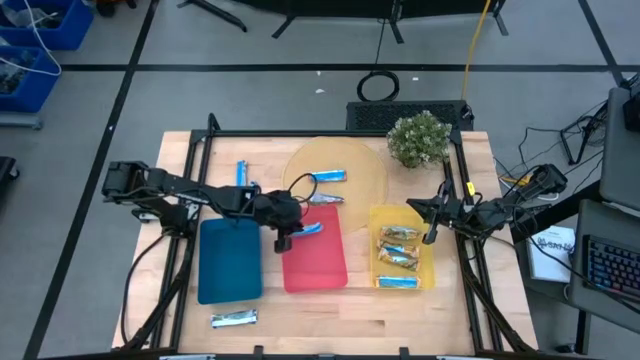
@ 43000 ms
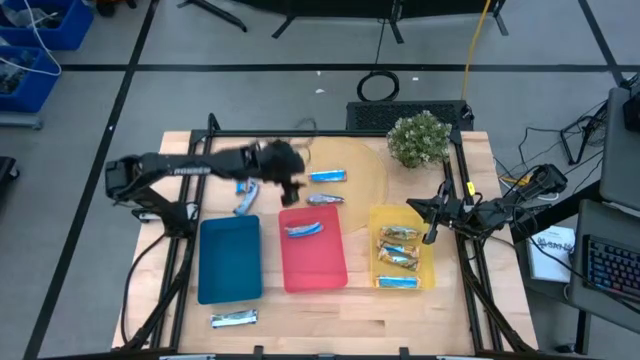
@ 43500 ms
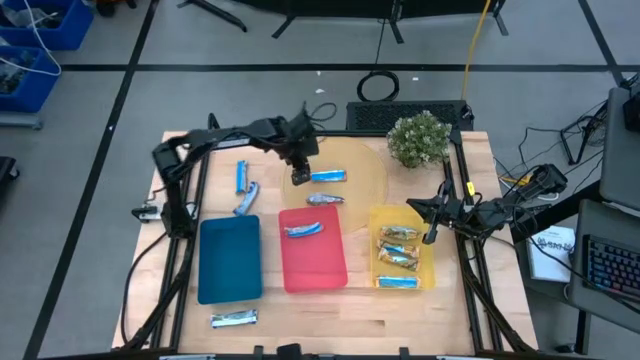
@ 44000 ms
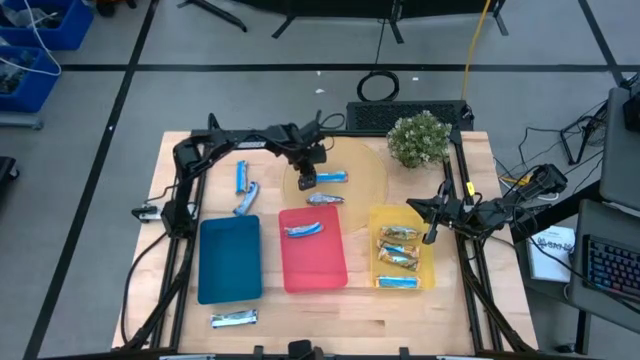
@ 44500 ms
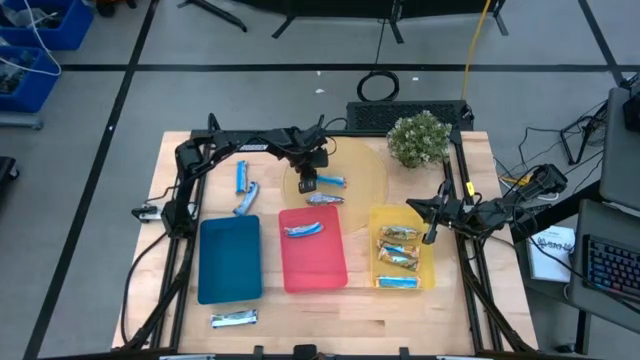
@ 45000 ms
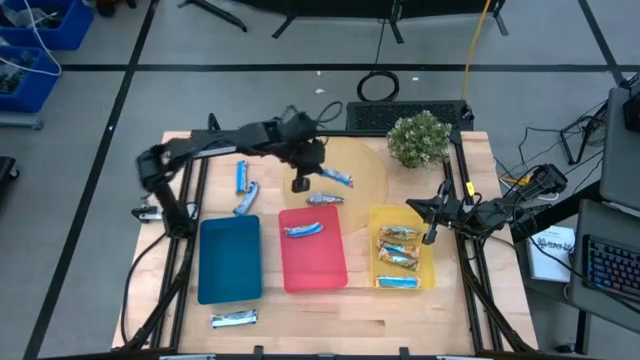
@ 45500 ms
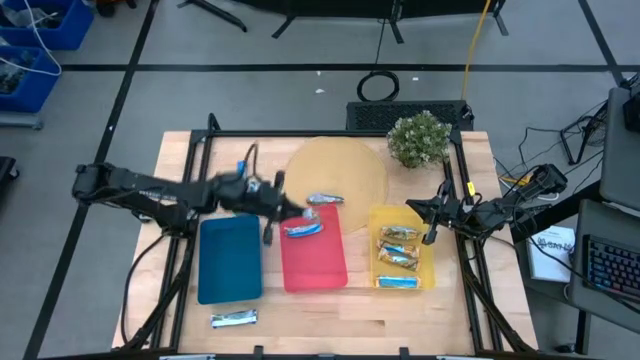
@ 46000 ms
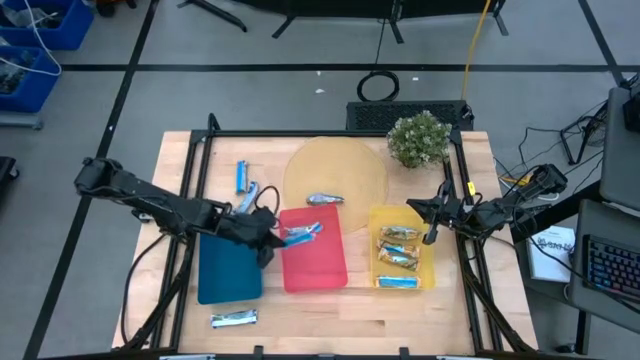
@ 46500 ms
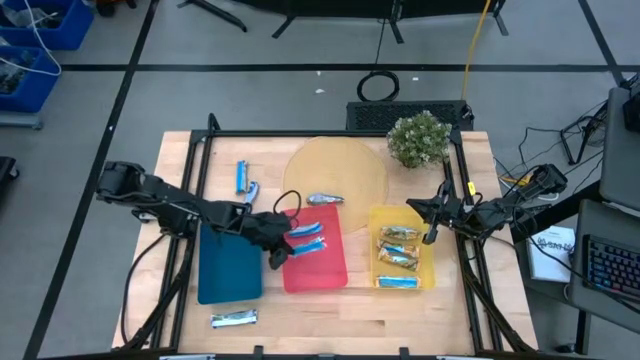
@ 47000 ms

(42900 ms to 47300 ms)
Task: Pick and place Granola Bars by type
Put the top red granola bar into the red bin

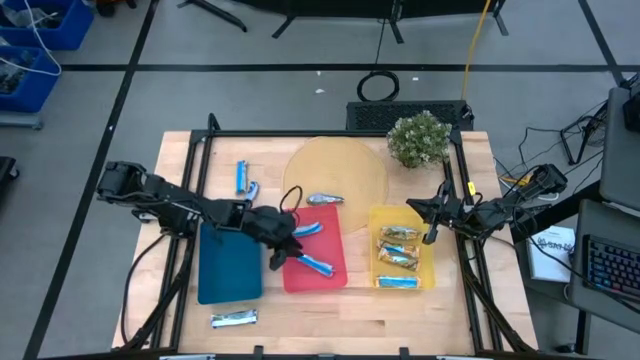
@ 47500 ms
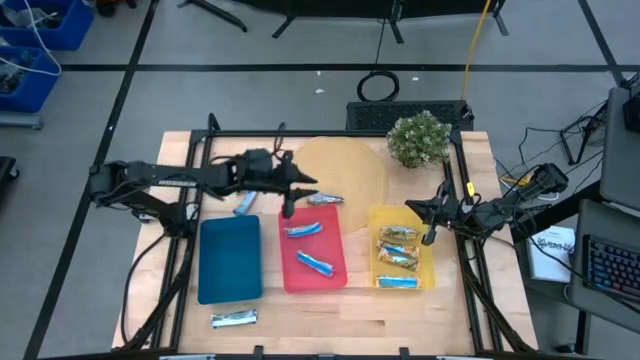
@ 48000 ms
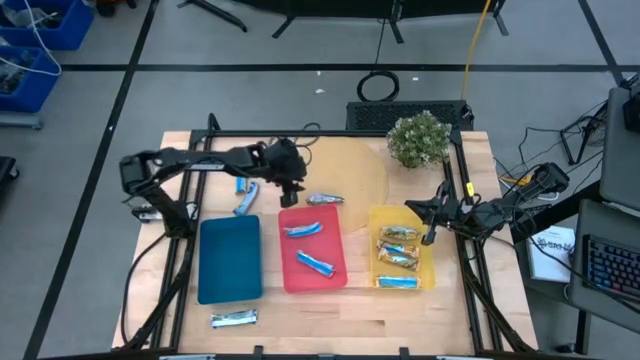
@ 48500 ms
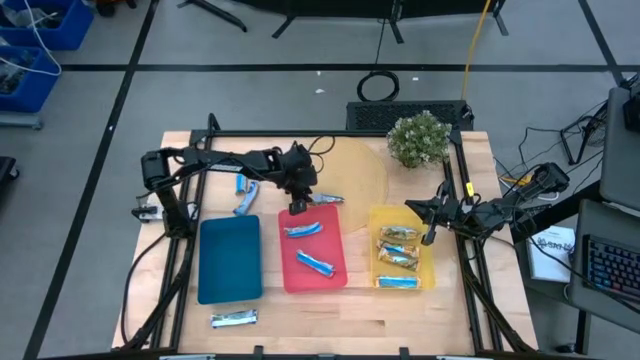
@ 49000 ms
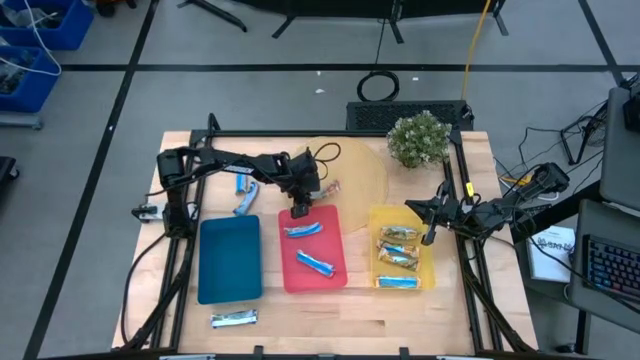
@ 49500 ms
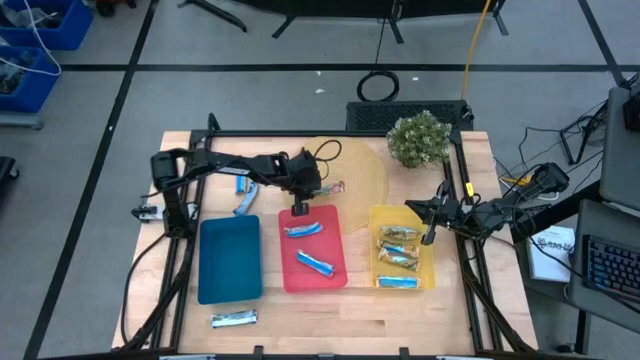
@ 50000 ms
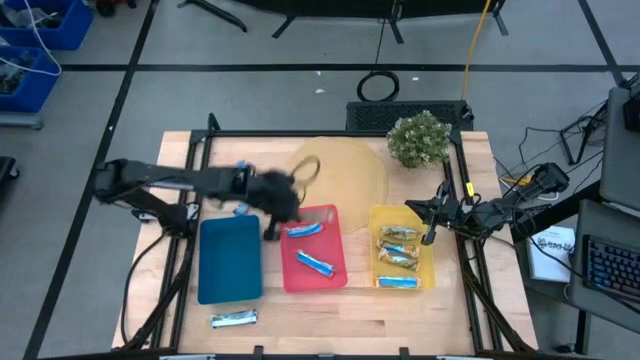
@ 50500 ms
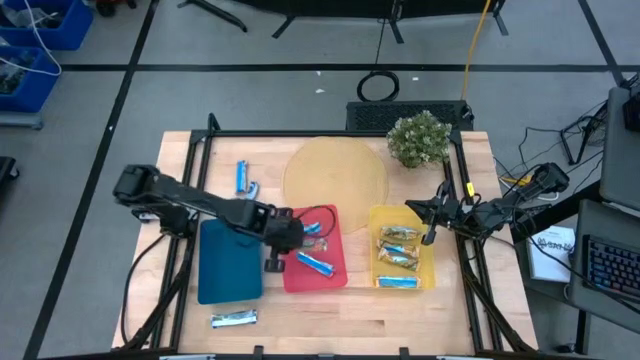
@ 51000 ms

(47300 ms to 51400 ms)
Put the red granola bar into the red bin

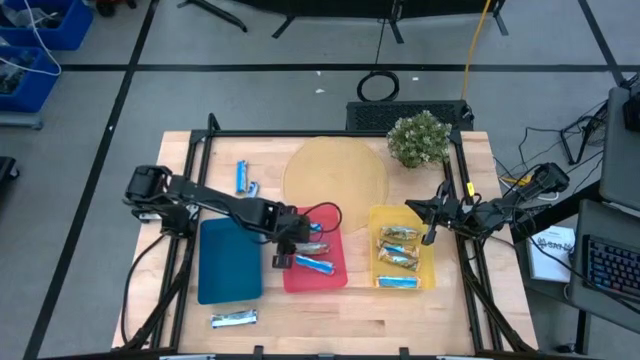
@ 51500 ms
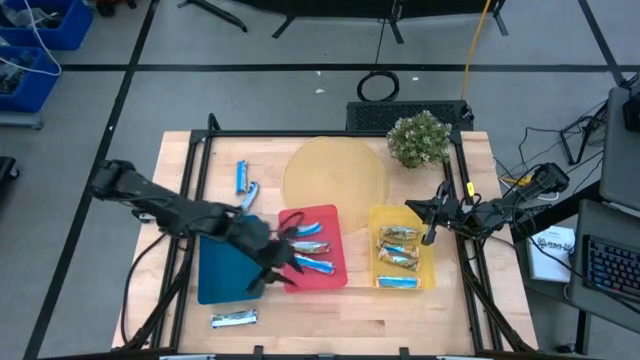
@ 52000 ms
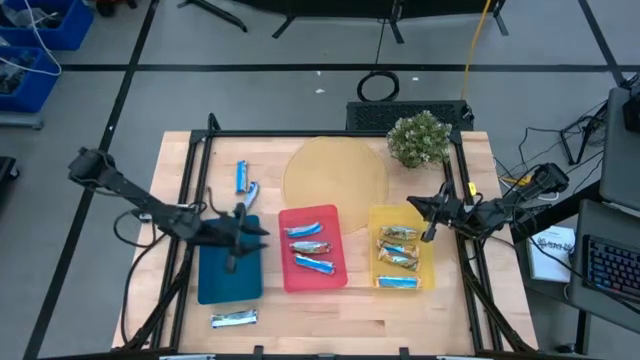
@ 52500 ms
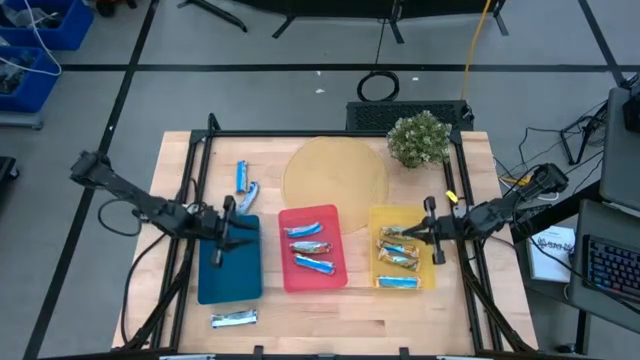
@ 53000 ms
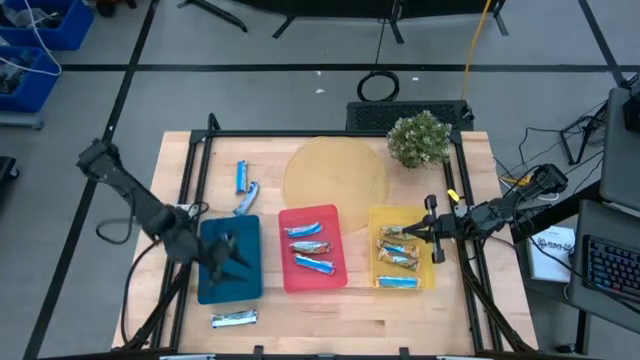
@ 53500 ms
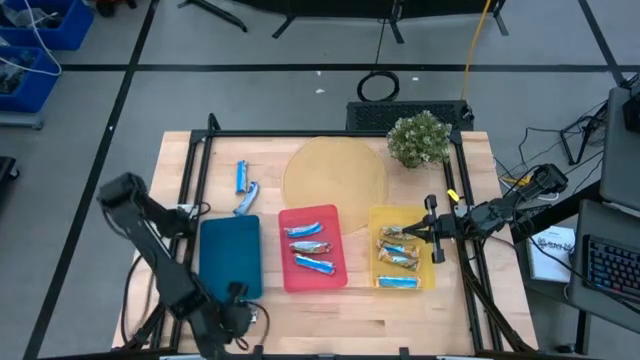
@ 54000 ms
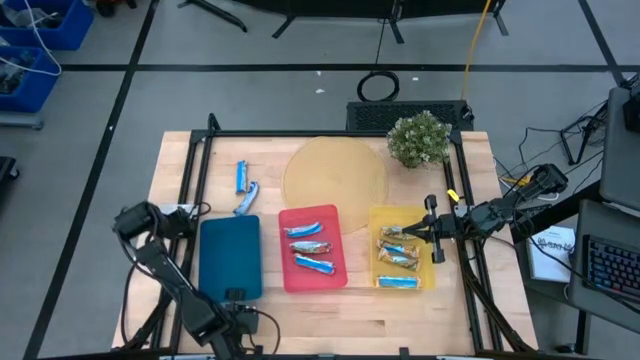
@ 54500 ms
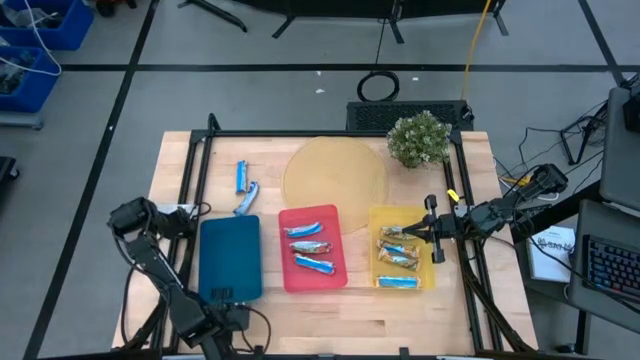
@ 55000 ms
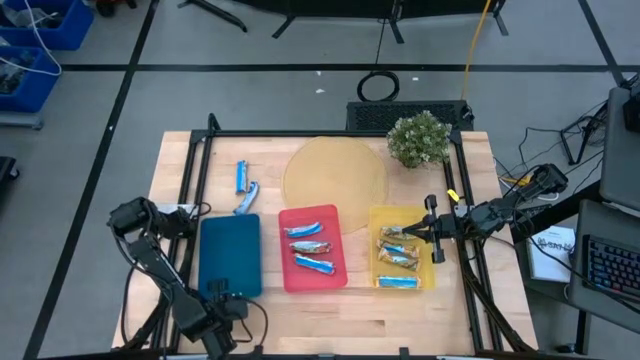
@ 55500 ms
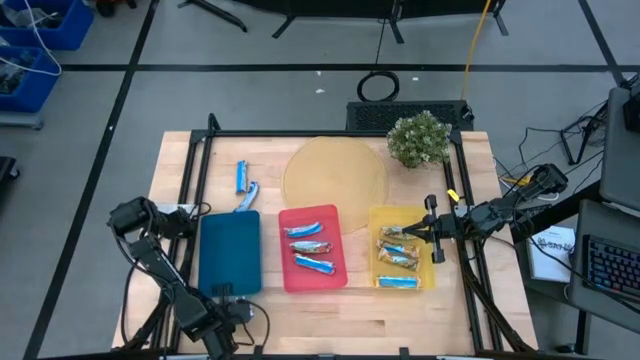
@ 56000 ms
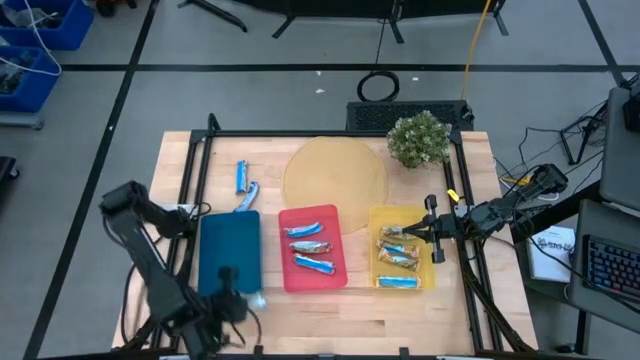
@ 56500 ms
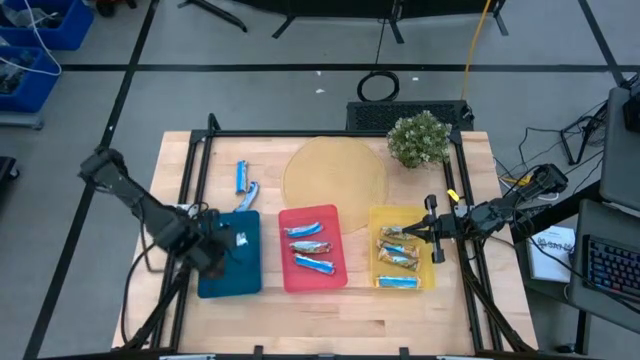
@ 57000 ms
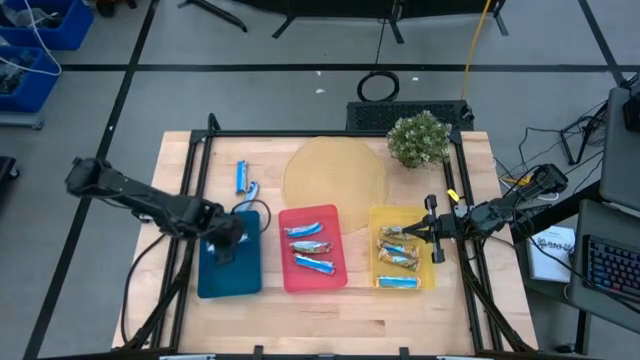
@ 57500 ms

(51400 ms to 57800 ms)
Put the bottom blue granola bar into the blue bin

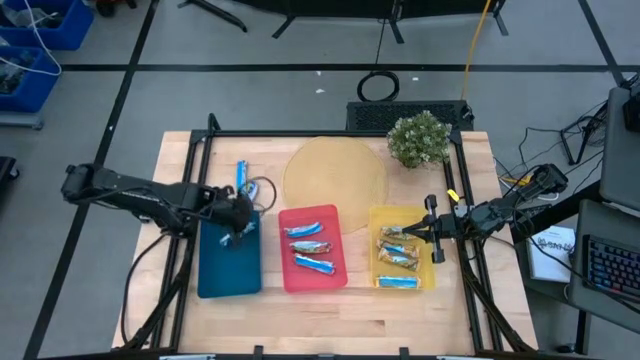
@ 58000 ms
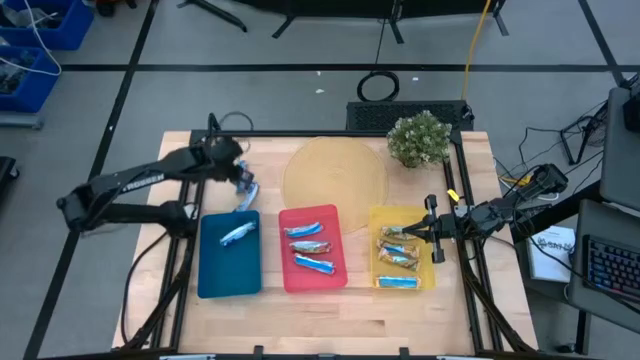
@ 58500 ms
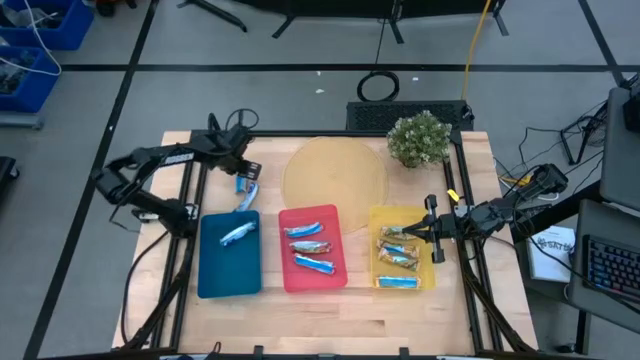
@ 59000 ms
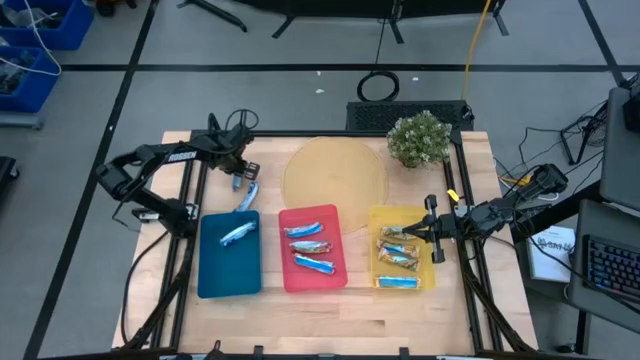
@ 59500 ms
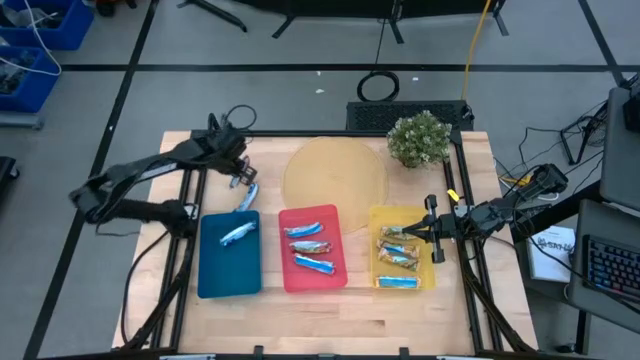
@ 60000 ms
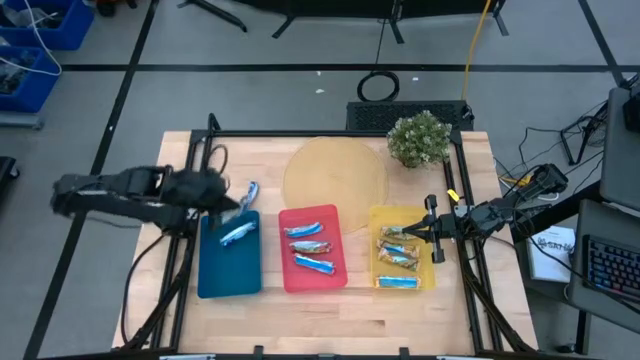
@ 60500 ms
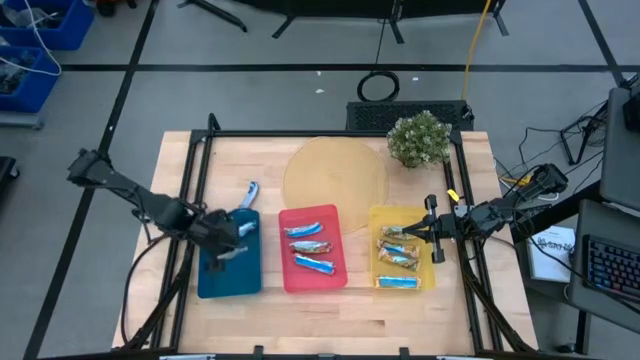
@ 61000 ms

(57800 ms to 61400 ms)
Put the top blue granola bar into the blue bin

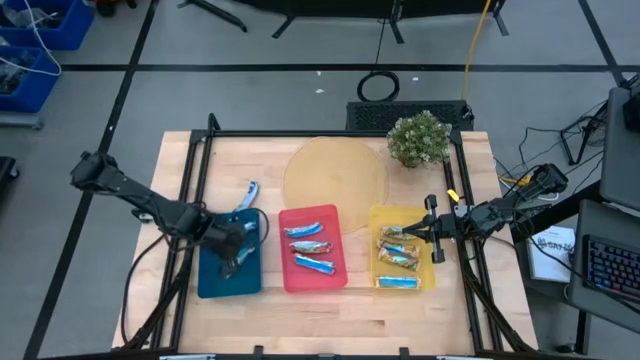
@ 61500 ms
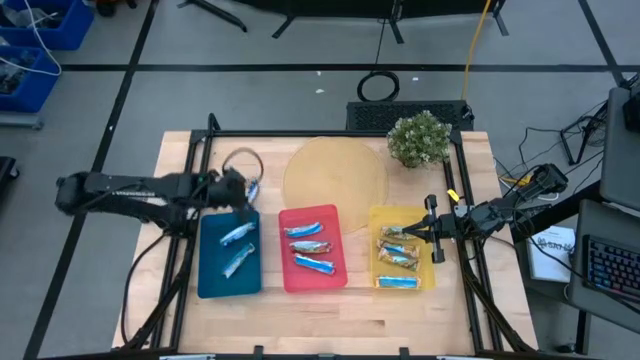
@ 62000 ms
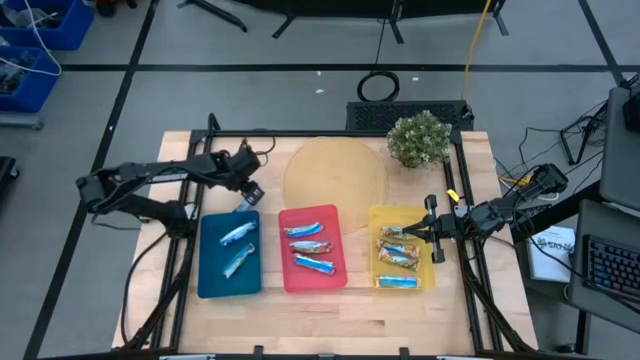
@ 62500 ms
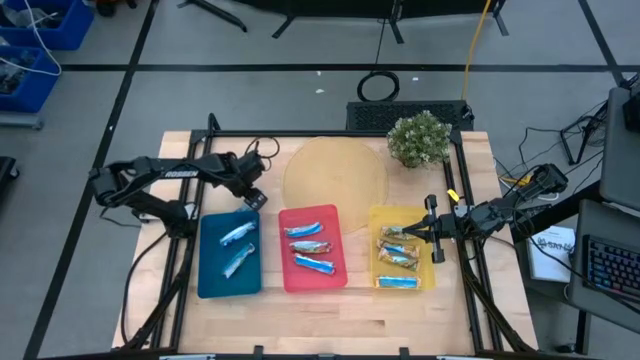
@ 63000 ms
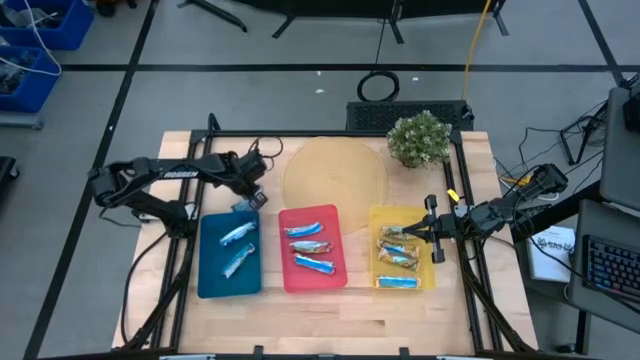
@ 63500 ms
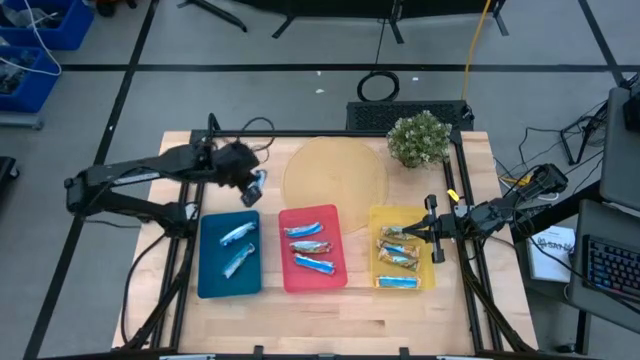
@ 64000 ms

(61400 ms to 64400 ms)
Put the blue granola bar into the blue bin
